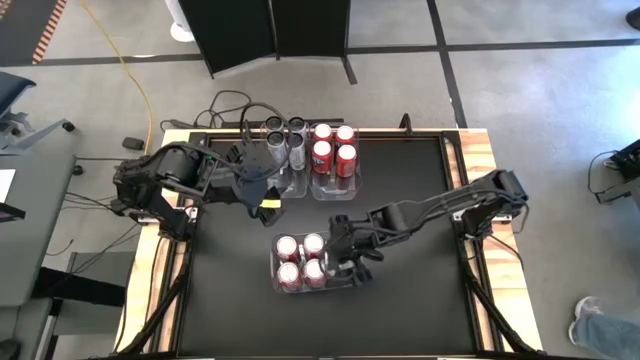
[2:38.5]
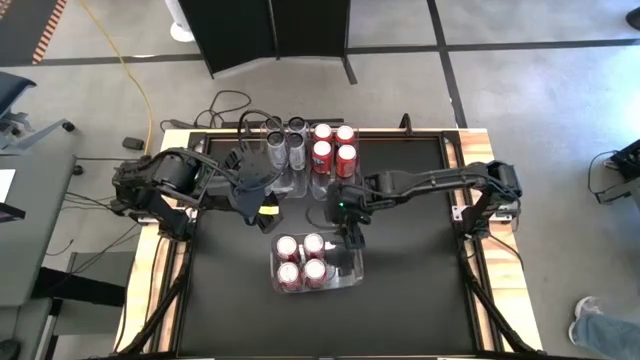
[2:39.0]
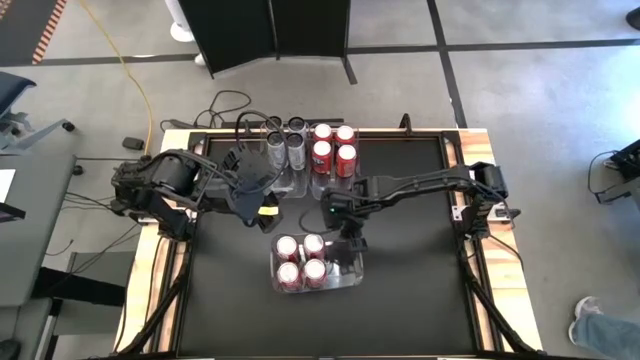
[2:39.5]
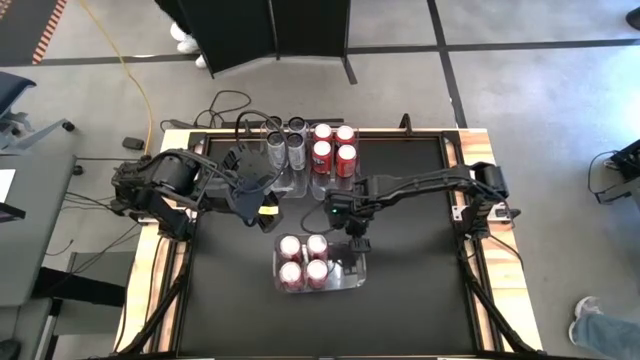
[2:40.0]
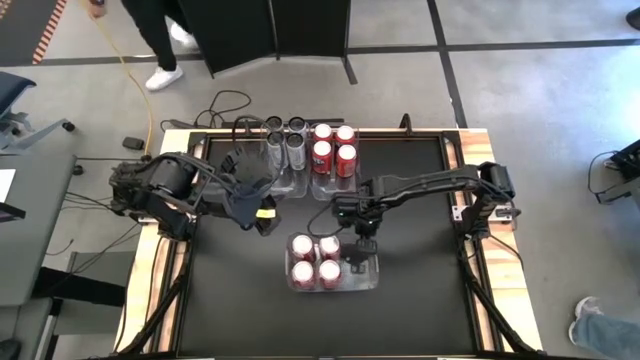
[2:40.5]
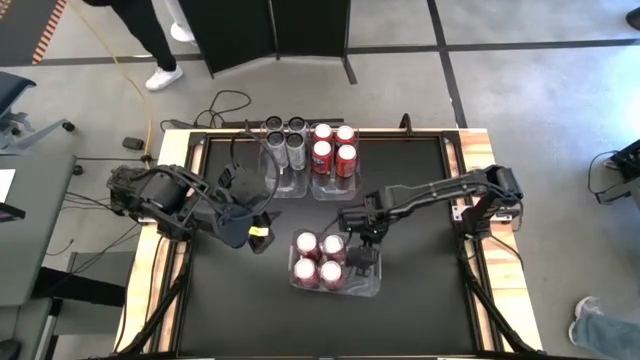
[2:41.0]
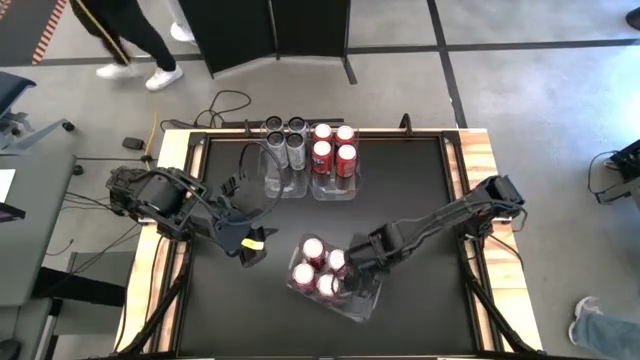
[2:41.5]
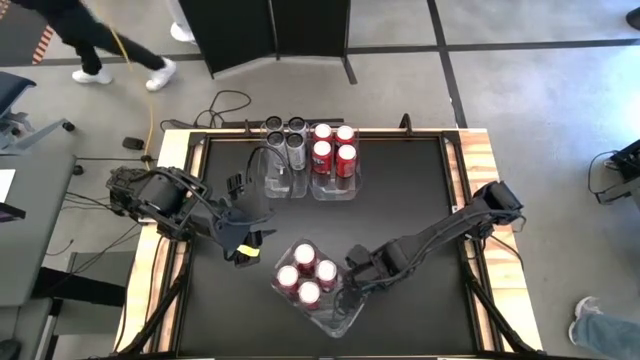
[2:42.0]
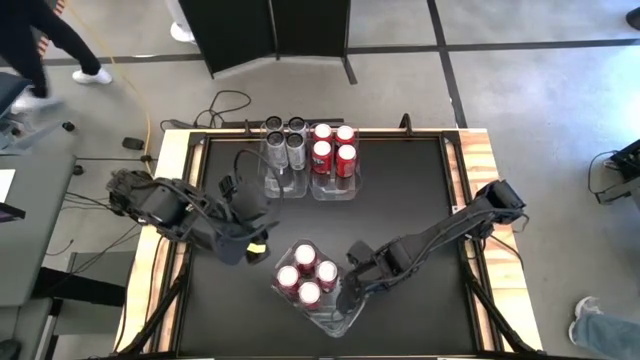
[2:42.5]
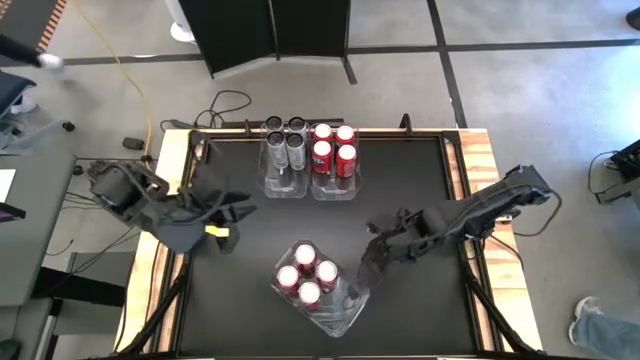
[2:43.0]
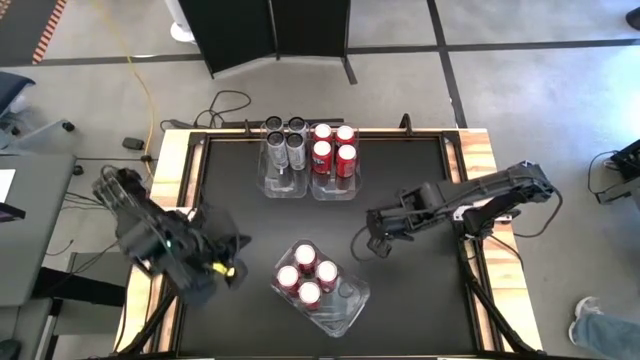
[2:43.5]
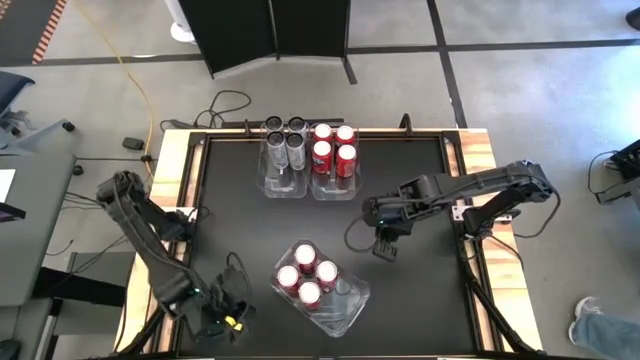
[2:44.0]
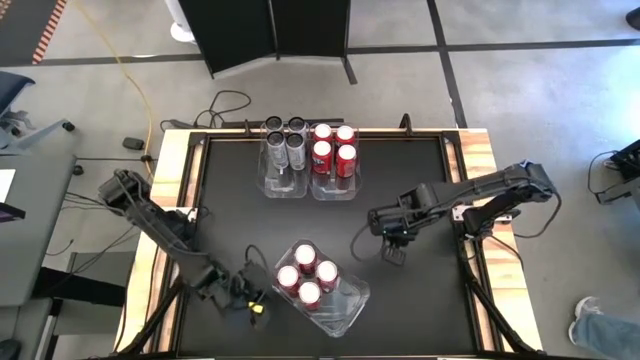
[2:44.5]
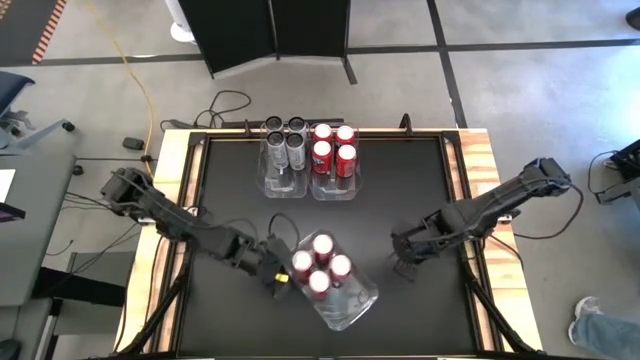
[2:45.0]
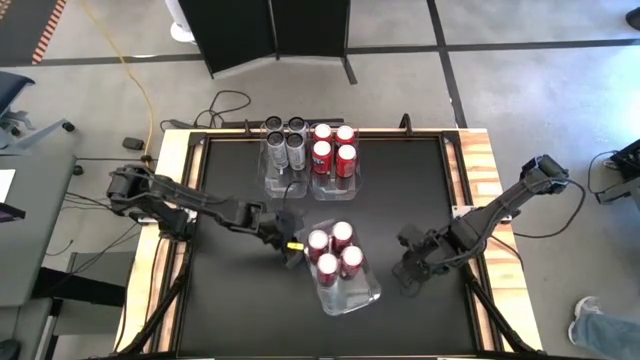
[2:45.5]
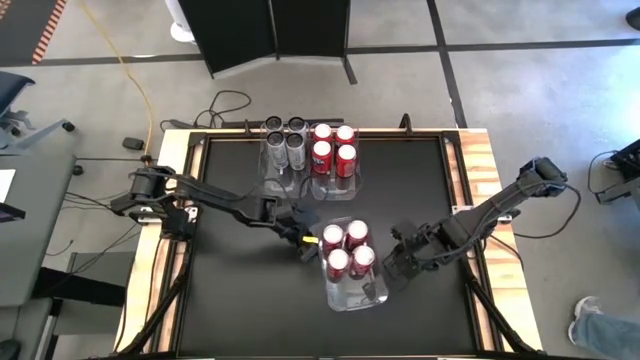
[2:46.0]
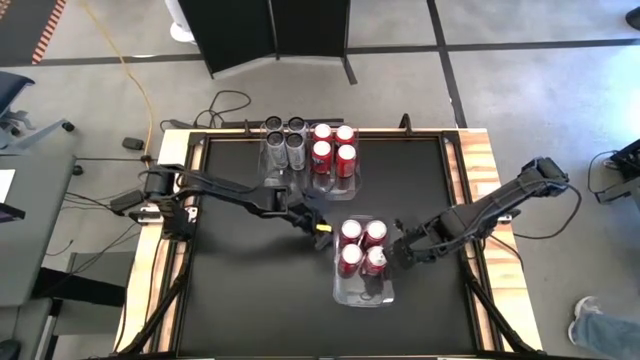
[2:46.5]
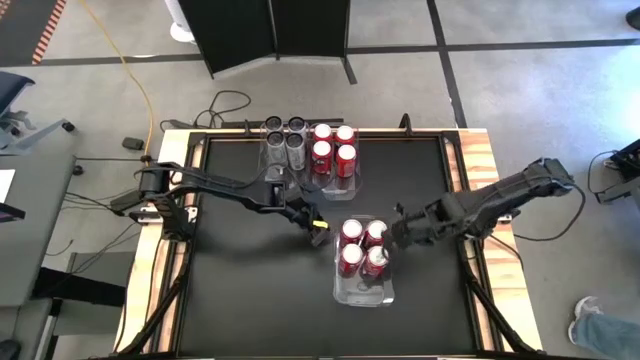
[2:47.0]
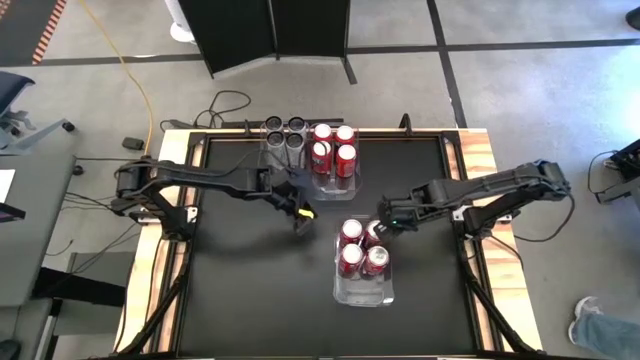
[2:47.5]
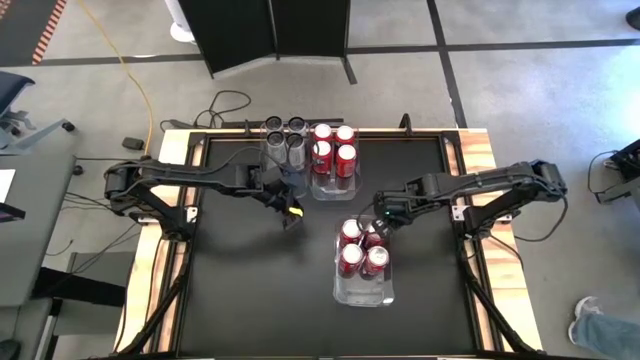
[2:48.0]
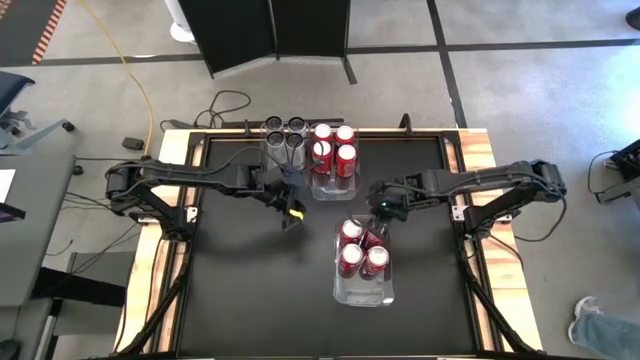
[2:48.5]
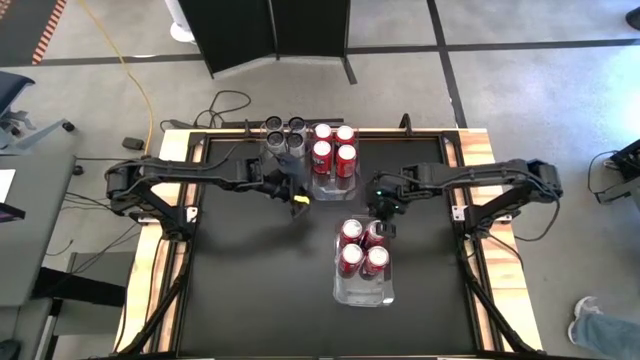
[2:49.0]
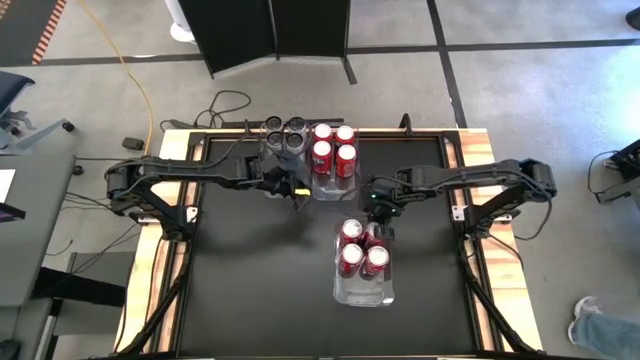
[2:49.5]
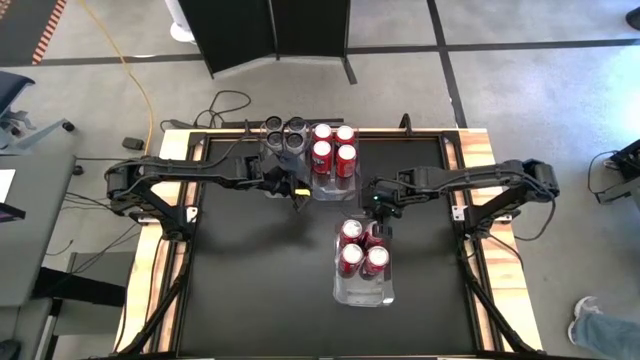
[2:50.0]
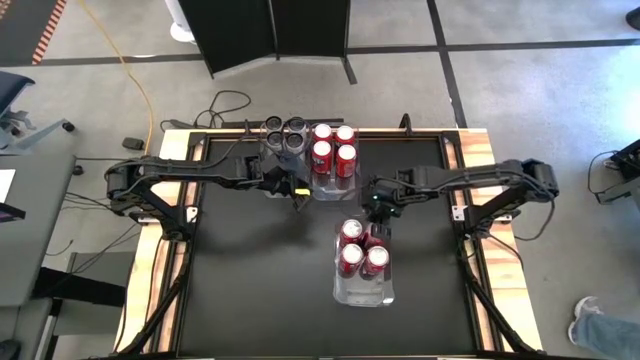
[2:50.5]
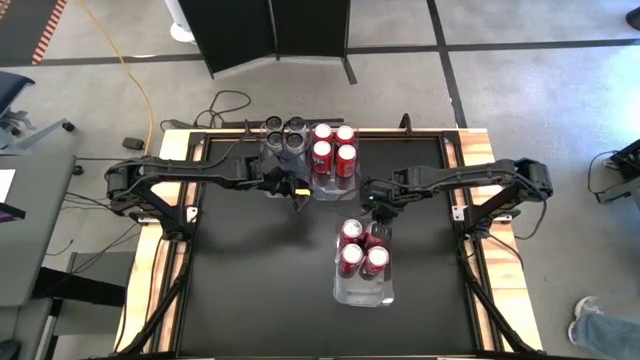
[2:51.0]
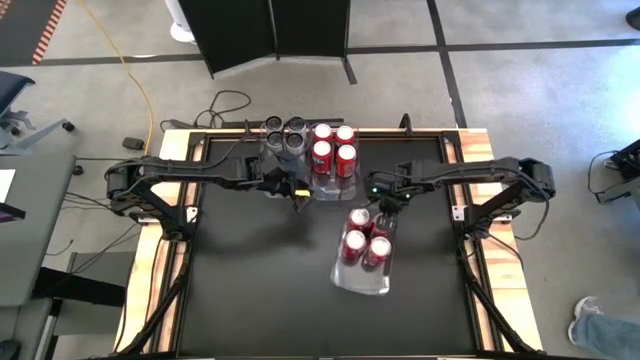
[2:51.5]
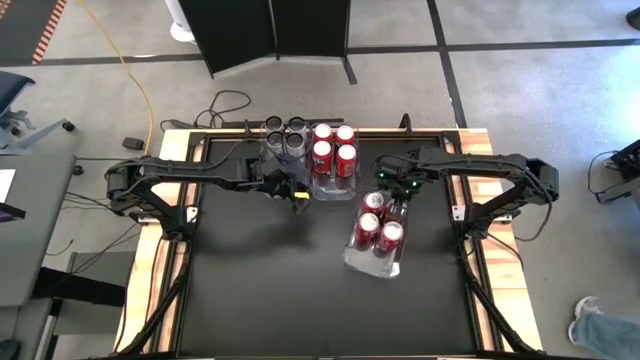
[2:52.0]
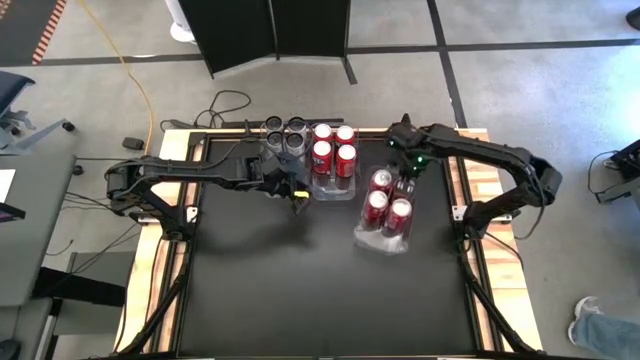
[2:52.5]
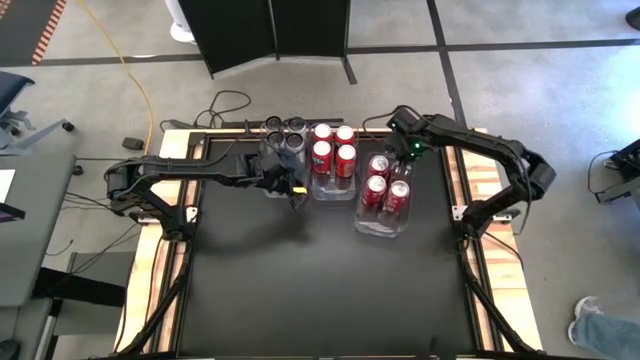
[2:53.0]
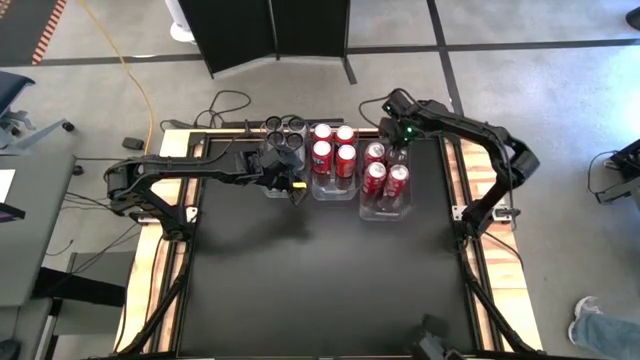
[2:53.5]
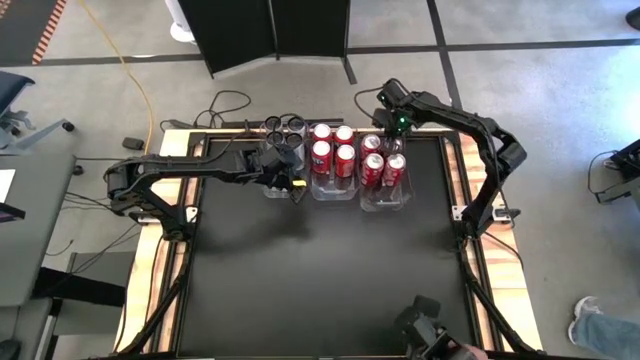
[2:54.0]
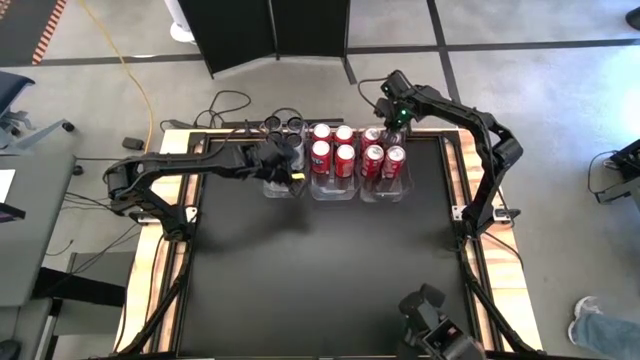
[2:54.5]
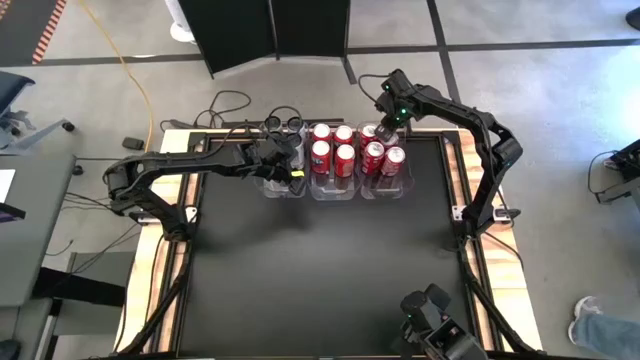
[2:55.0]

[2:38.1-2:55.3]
Task: Sort soda cans
Move the bottom transparent bin to the top right of the table

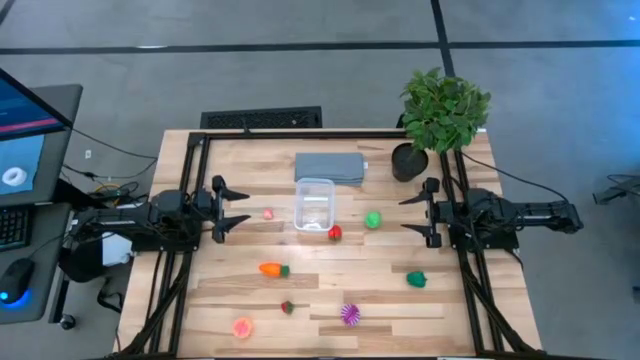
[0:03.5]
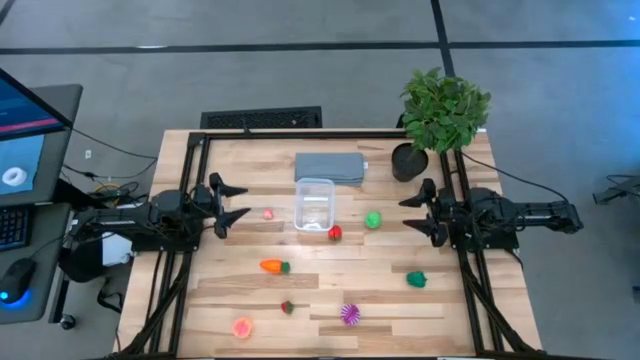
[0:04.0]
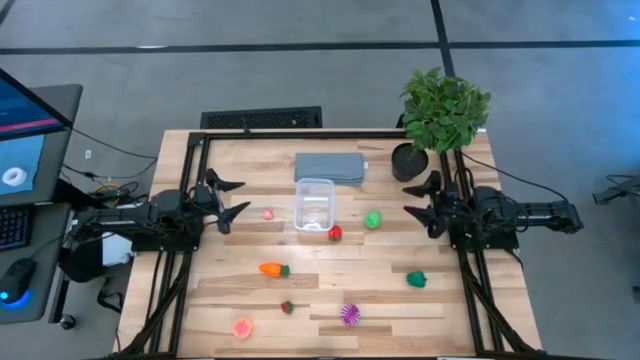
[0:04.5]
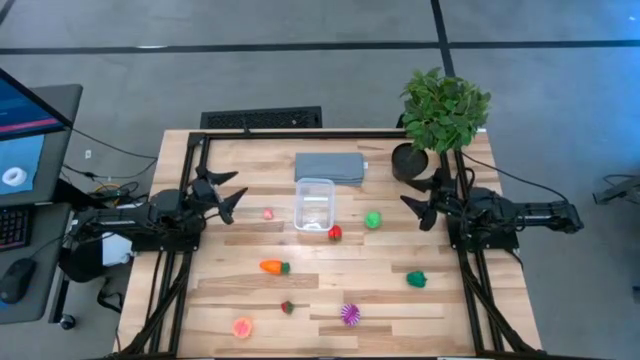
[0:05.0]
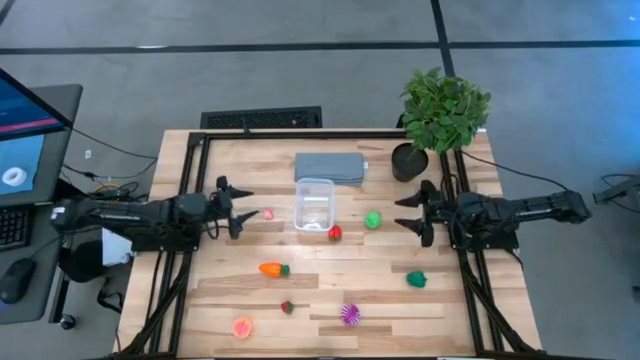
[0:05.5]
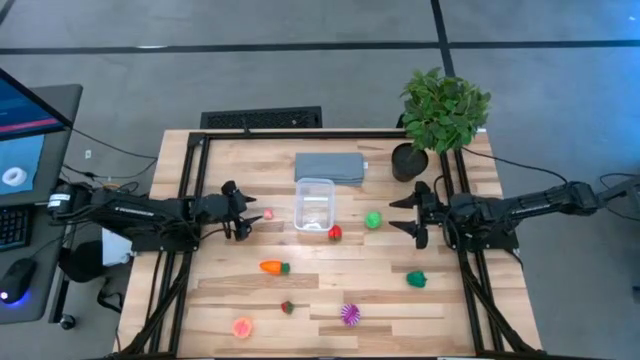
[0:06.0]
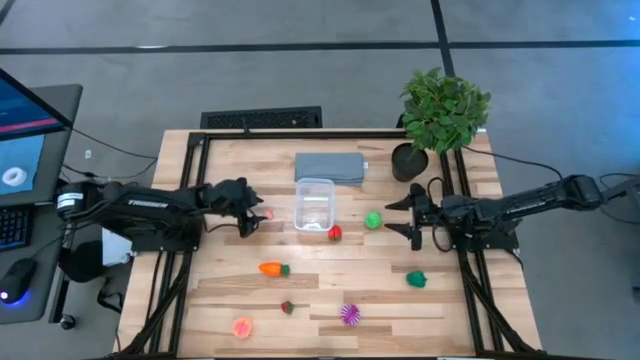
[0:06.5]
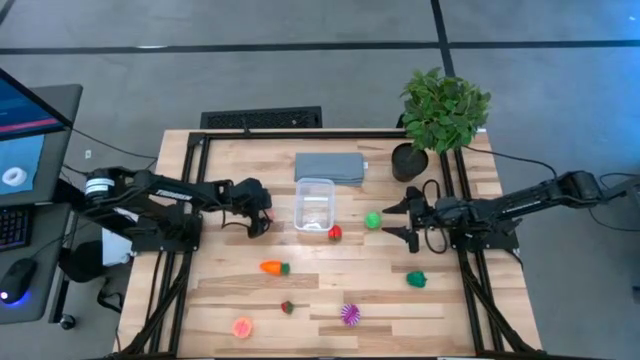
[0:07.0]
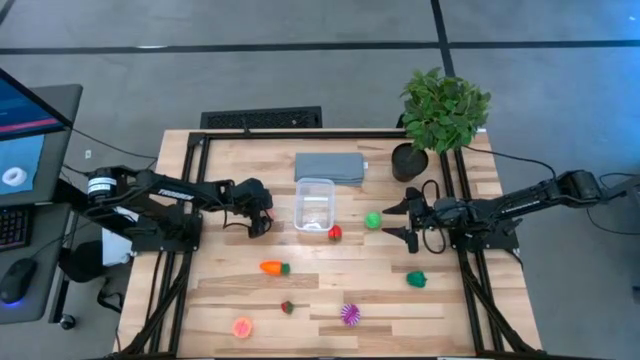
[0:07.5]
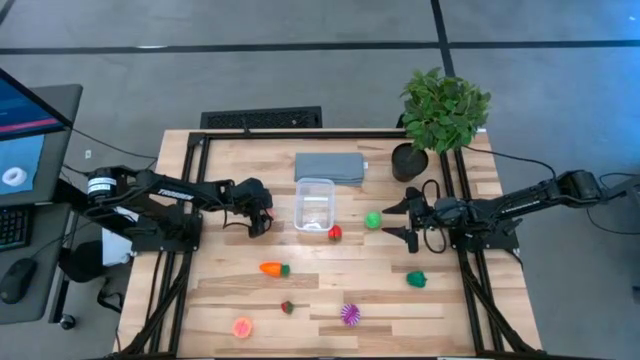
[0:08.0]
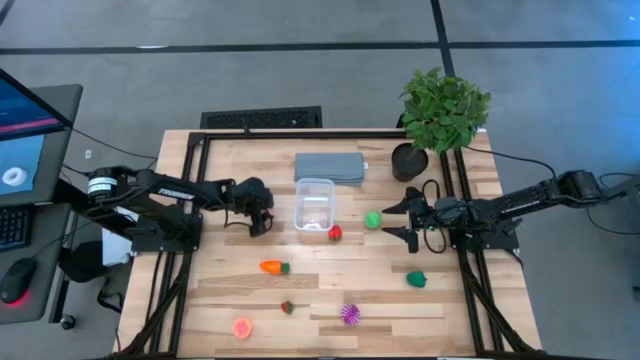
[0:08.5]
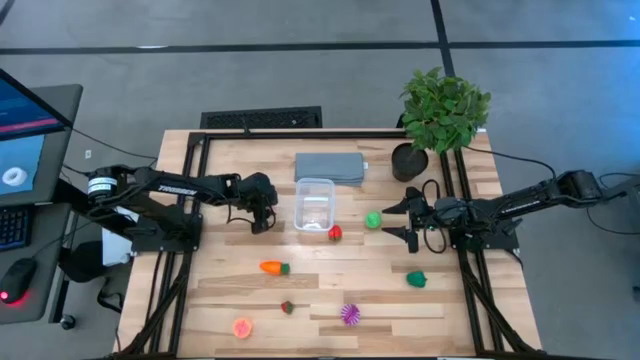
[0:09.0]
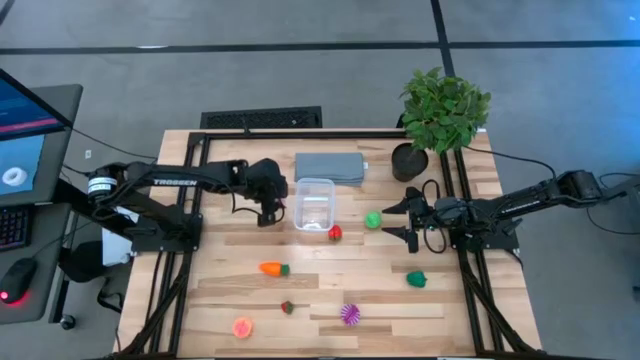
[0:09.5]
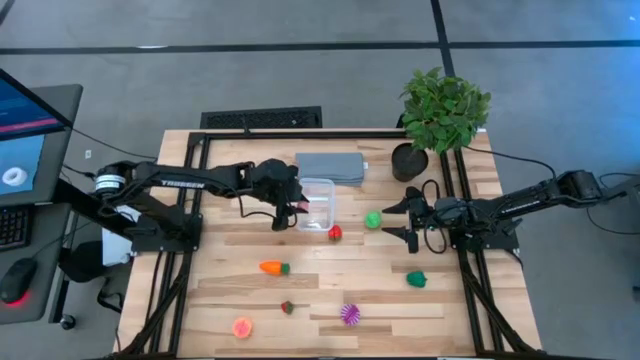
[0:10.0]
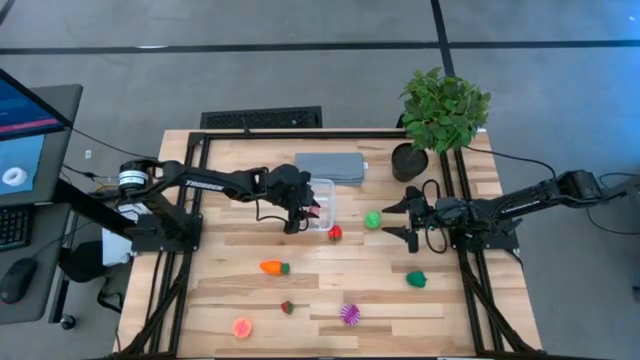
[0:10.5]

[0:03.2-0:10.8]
Task: Pick and placing Produce into tupperware
Put the top pink peach into the transparent bin
